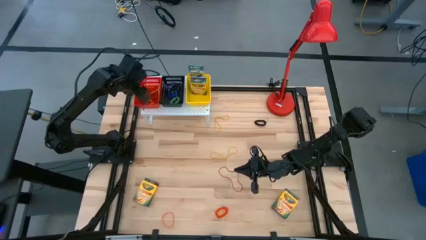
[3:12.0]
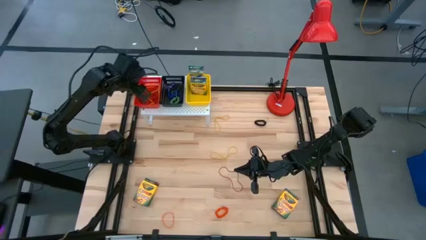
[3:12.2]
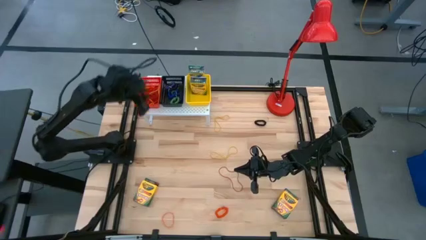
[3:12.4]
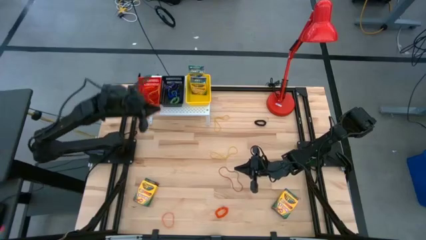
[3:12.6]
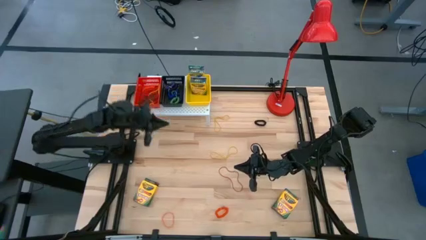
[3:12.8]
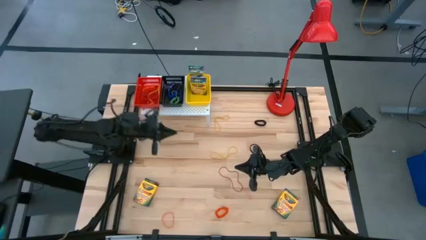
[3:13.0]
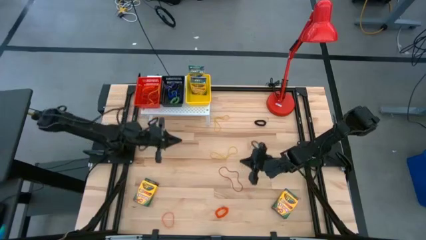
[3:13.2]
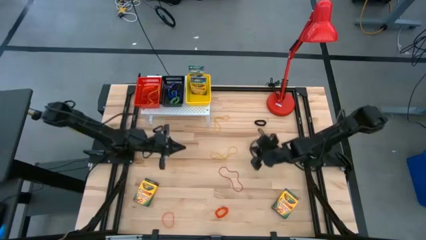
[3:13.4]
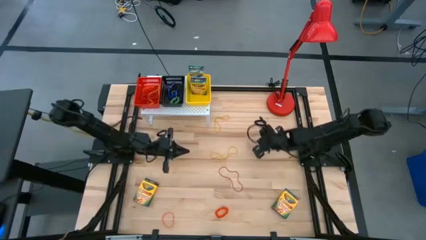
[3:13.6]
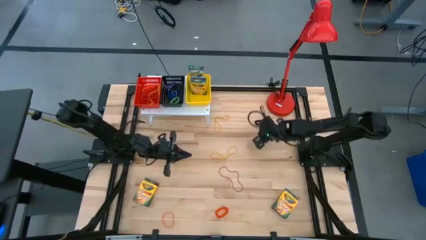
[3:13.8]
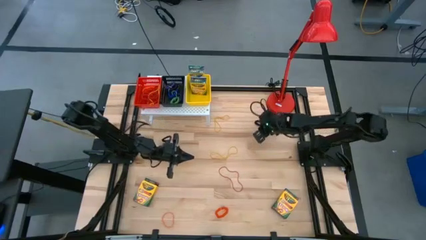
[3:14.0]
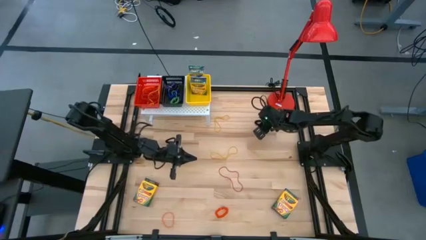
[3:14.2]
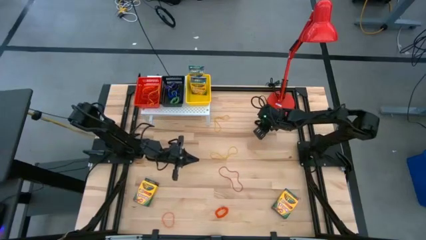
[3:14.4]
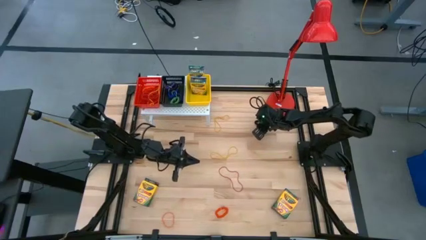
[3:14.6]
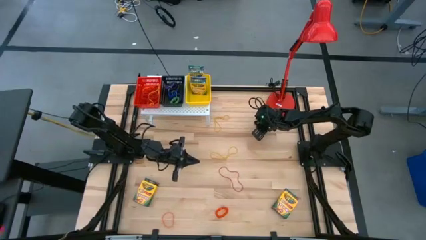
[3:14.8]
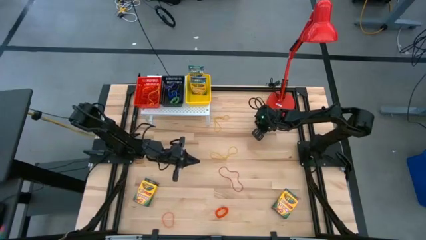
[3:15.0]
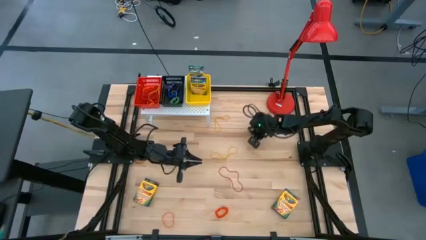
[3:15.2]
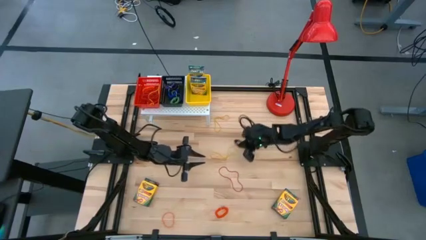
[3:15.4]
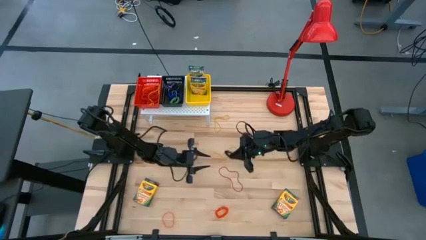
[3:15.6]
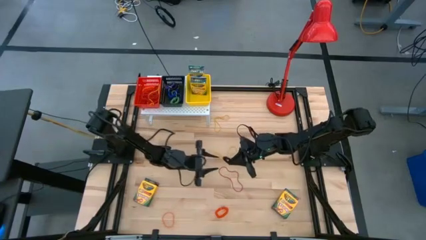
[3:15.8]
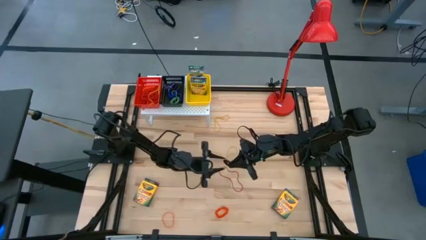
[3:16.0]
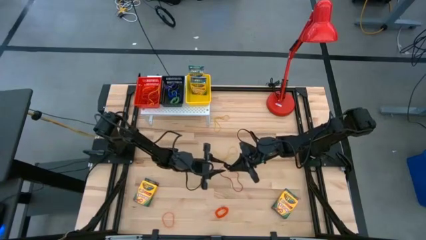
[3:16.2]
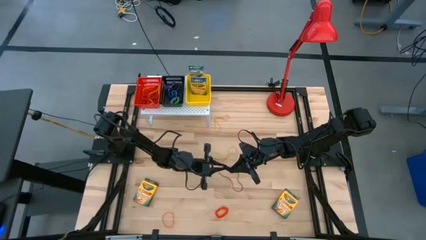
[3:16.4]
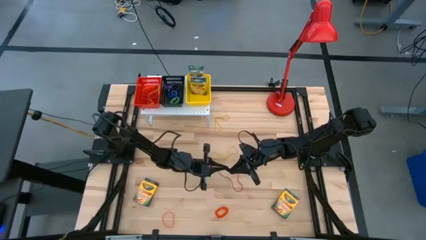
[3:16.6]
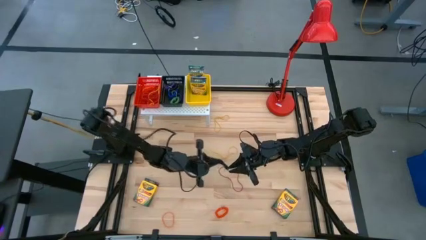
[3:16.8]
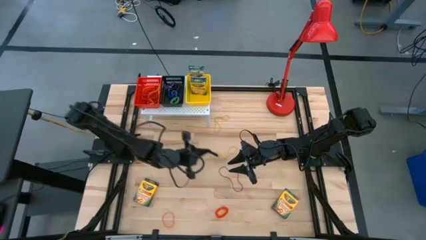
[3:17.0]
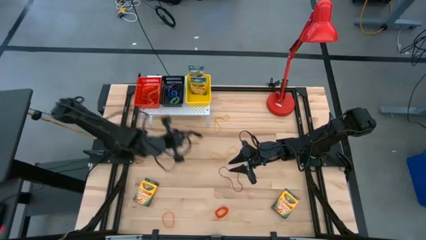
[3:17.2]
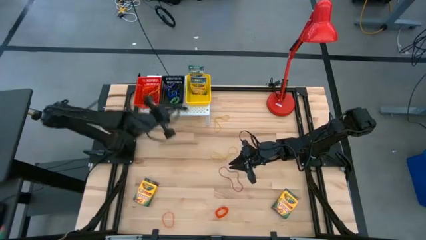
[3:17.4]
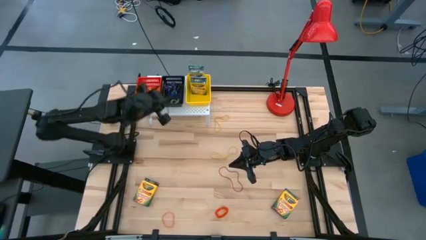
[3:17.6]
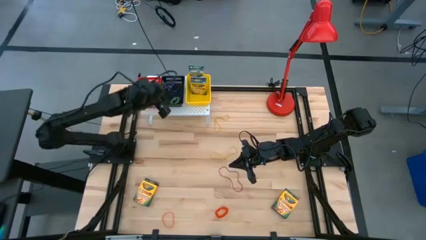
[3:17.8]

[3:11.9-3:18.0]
Task: Pick & Place Office Desk Supplies
Put the black spring keychain into the black bin on the shelf

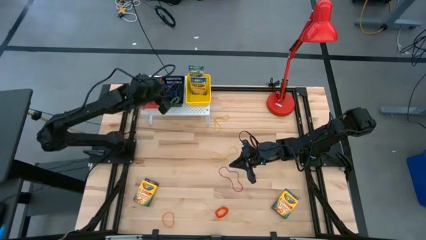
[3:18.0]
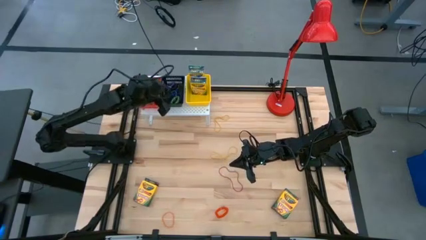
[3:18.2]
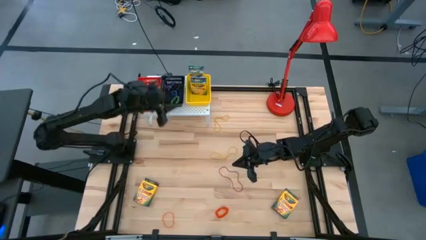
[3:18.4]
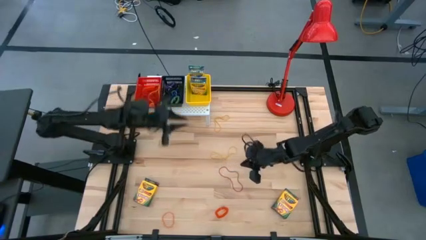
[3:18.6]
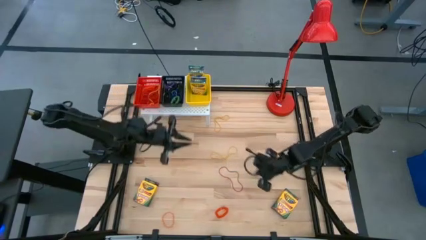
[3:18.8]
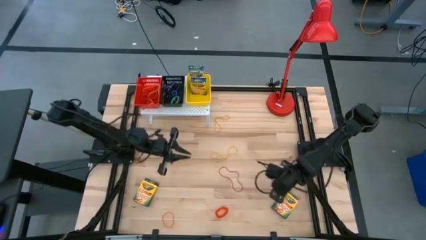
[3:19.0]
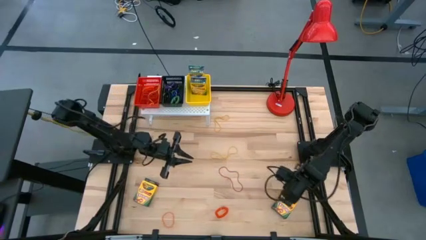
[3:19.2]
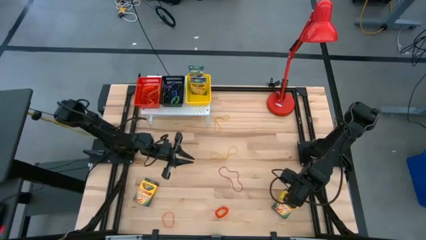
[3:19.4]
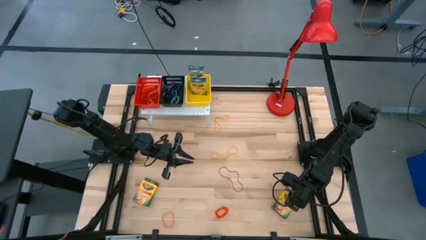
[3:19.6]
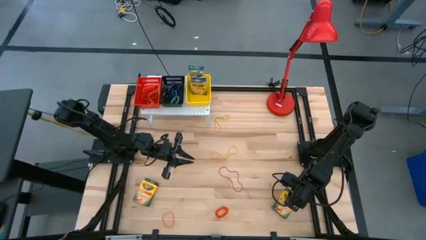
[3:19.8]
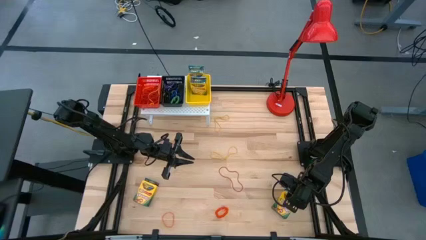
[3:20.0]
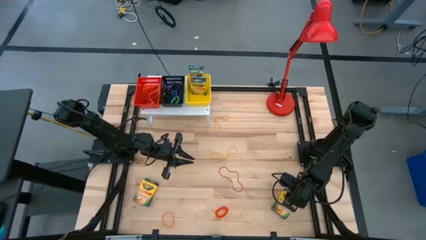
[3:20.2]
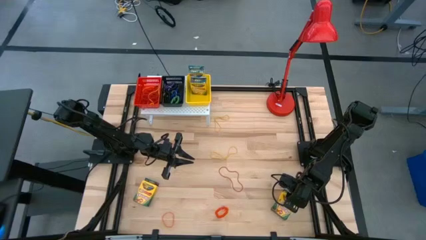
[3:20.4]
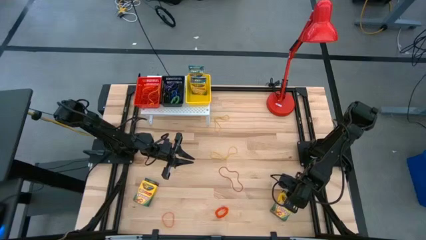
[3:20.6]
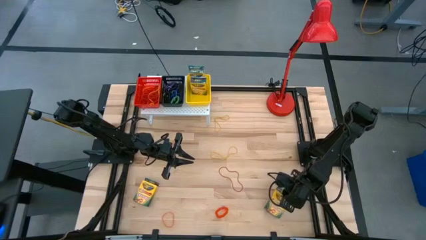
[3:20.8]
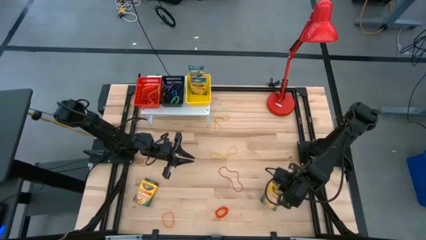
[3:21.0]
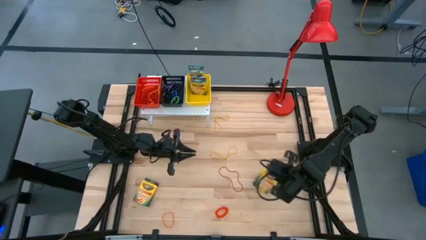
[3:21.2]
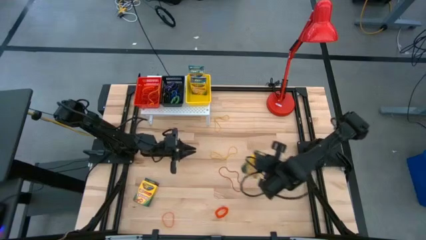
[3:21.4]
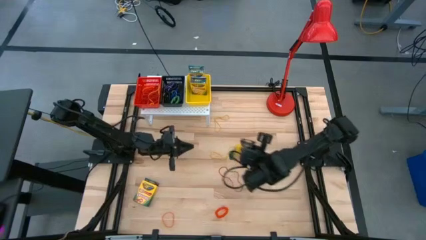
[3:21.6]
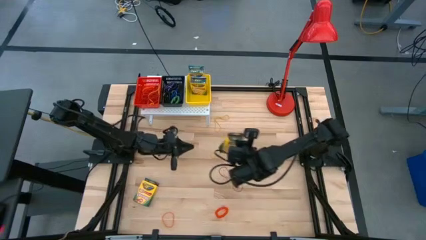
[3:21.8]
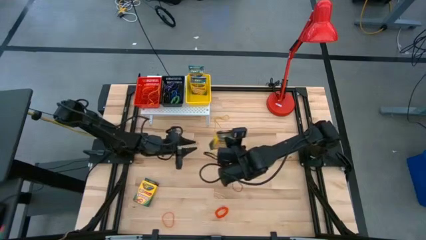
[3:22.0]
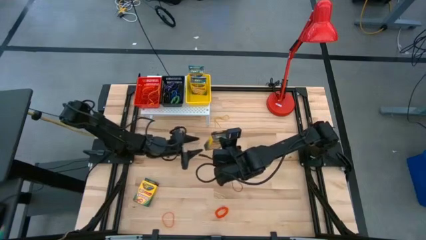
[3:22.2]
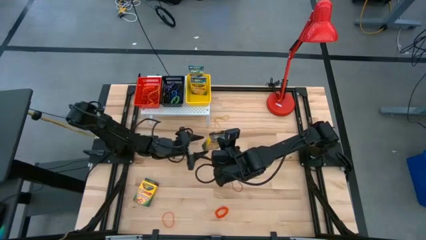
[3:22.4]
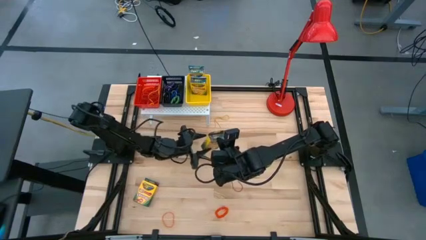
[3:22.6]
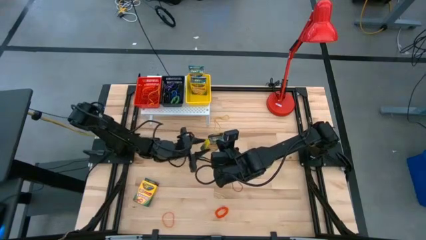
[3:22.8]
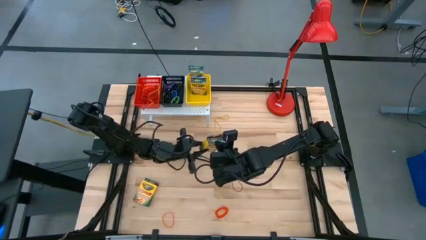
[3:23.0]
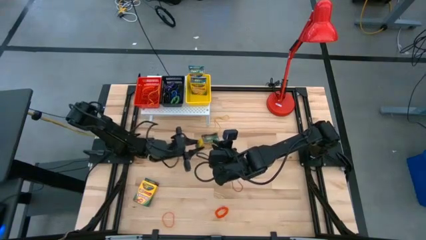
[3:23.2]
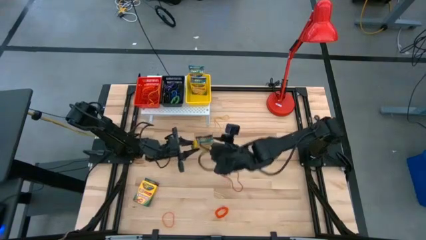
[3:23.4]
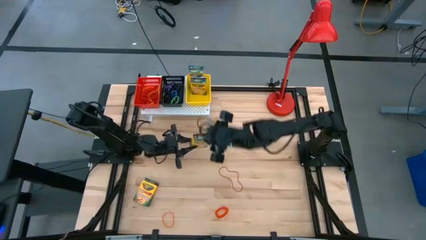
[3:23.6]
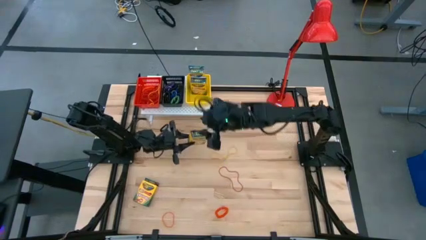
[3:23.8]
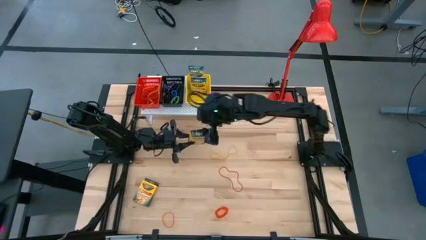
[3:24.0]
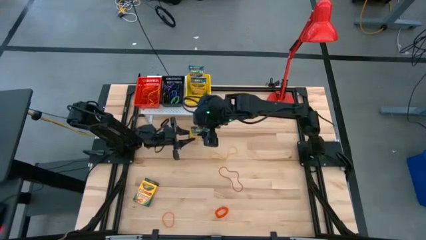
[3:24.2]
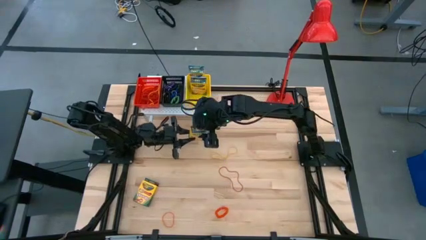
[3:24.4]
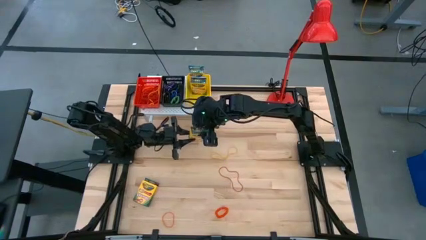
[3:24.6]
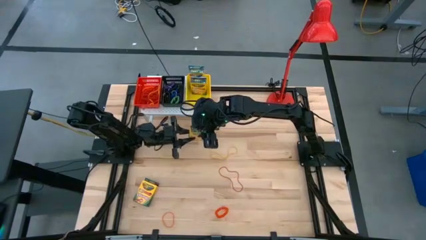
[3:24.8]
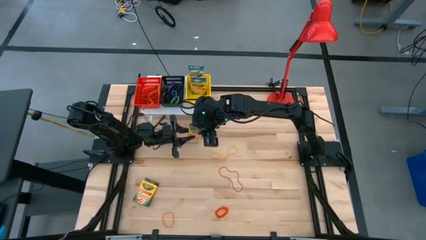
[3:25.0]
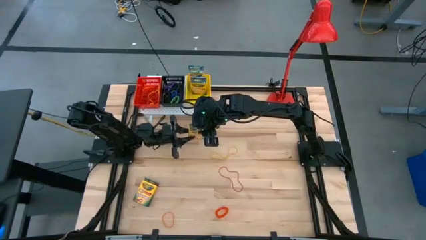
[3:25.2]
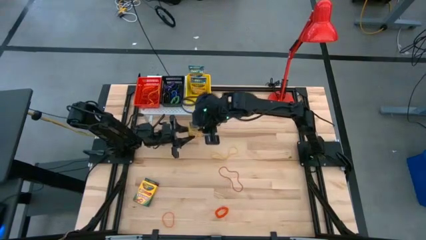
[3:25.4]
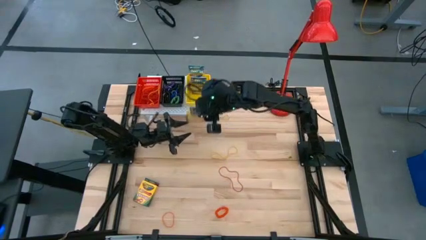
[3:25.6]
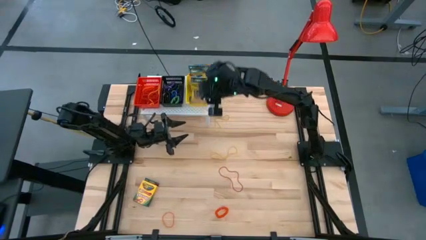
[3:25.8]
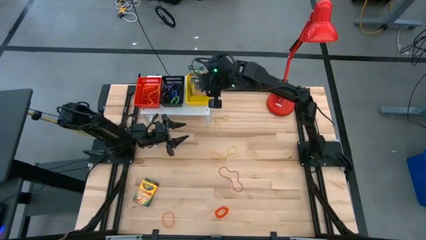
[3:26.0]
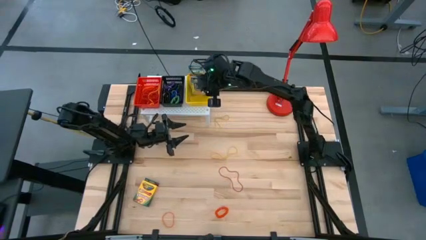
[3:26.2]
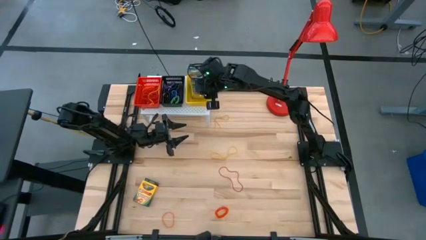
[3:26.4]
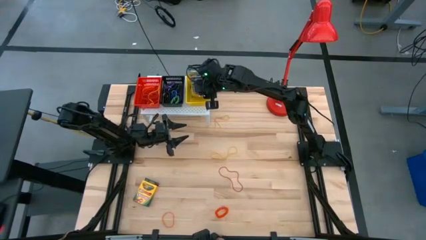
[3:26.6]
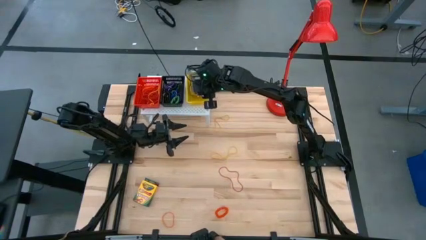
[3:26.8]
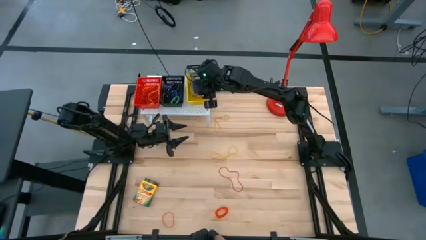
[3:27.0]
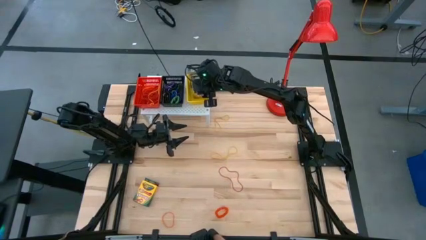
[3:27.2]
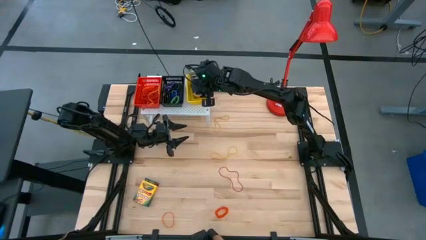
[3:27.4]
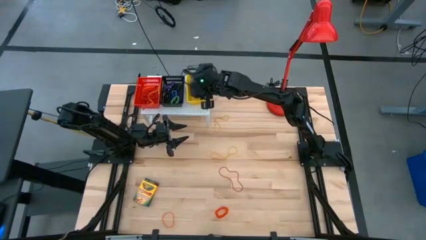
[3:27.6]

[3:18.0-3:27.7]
Put the crayon box into the yellow bin on the shelf

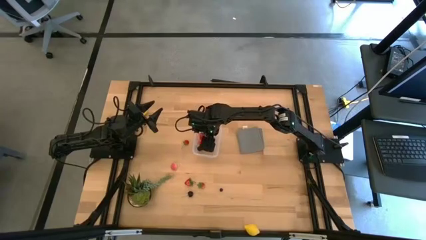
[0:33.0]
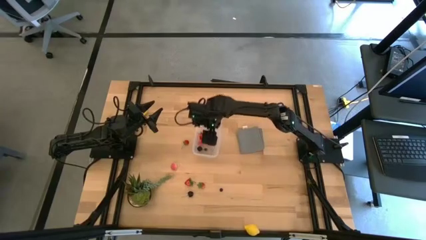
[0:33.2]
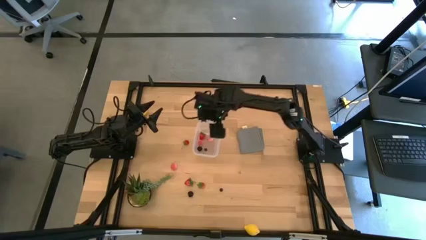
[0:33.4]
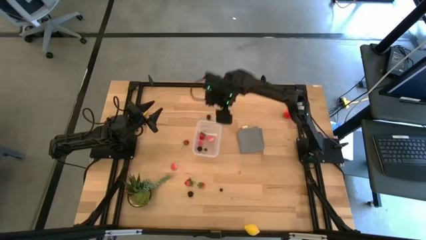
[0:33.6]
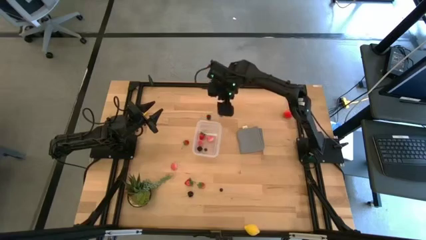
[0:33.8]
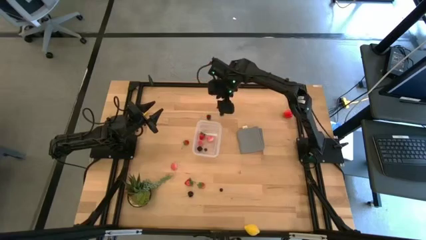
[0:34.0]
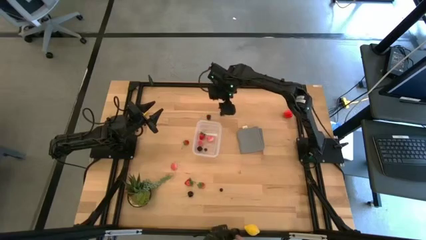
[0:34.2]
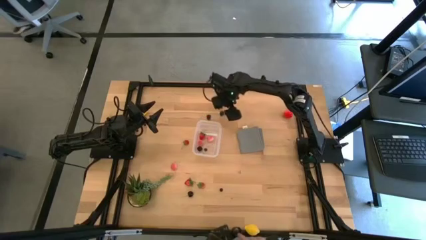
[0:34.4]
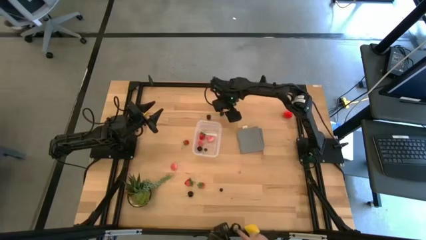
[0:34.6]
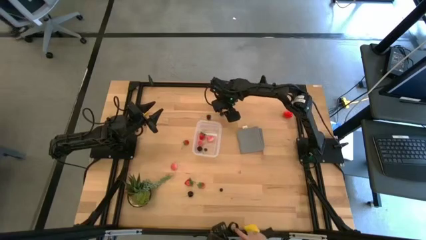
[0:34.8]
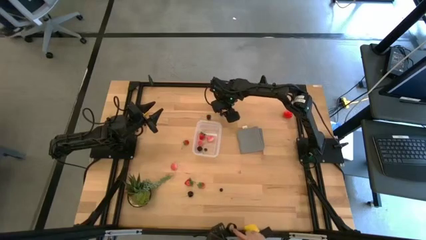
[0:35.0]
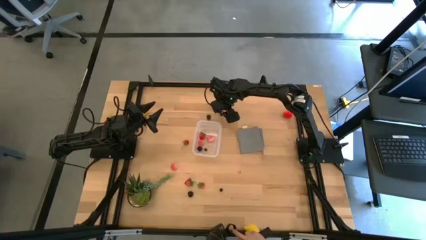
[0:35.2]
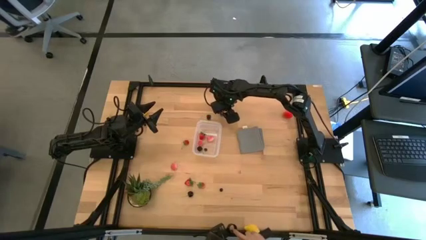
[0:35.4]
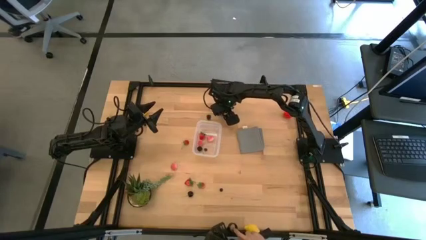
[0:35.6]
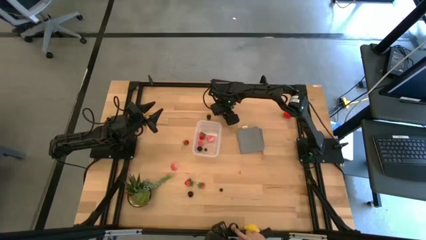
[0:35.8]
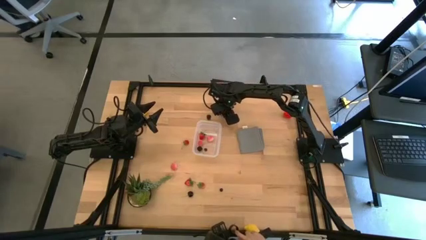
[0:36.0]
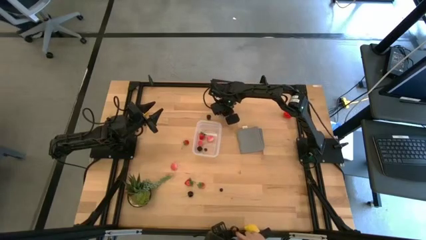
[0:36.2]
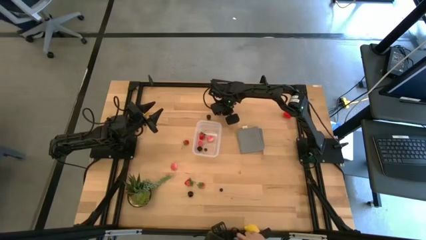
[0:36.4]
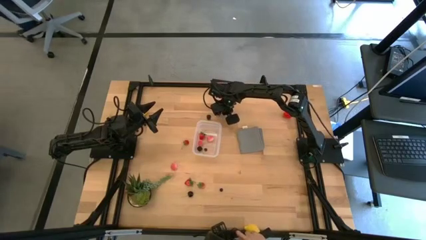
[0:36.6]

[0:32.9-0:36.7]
Task: Pick and placing Produce into tupperware
Put the blackberry into the transparent bin
